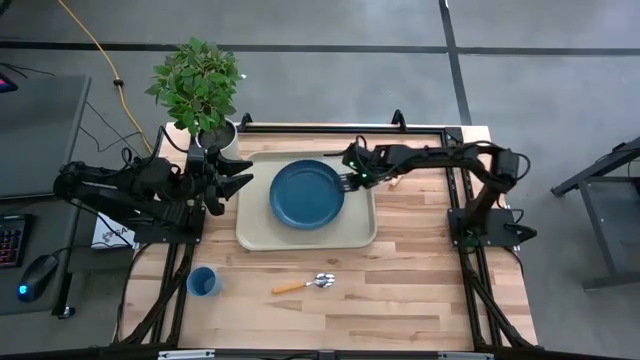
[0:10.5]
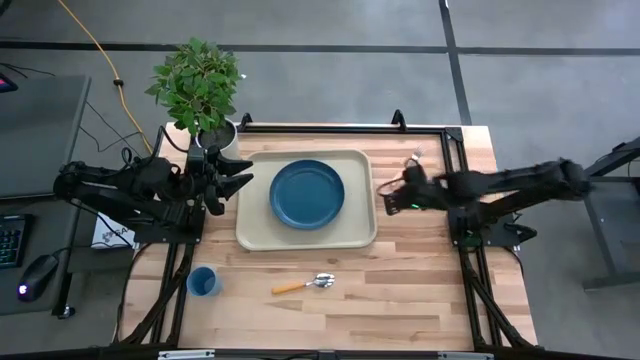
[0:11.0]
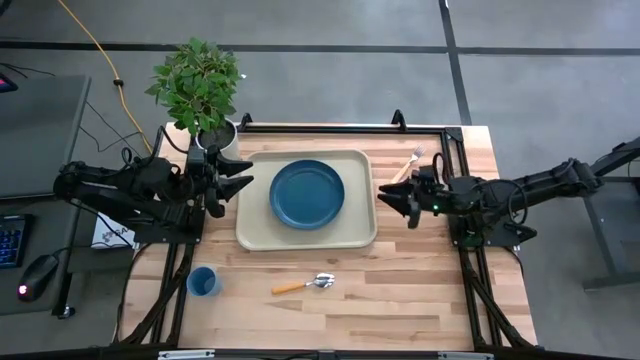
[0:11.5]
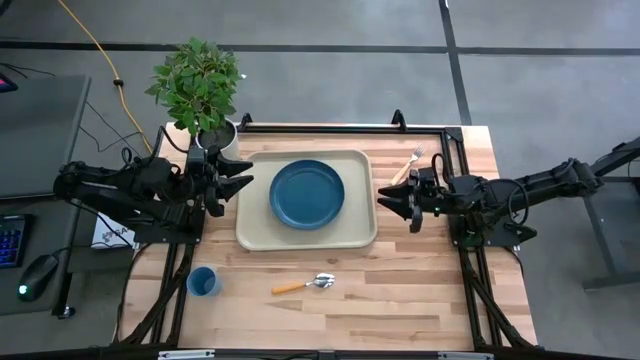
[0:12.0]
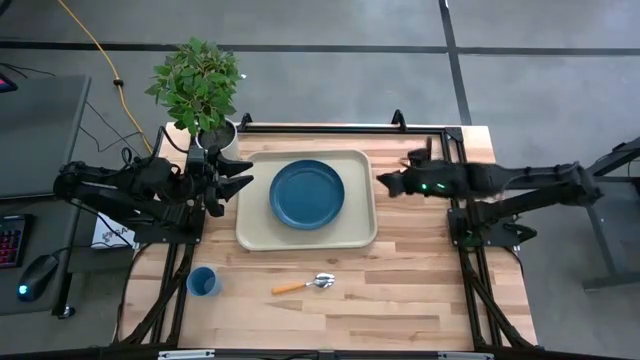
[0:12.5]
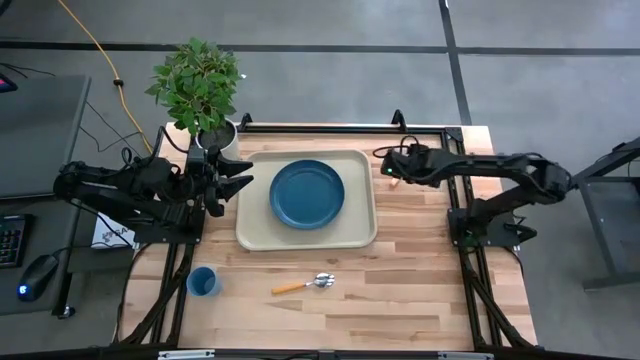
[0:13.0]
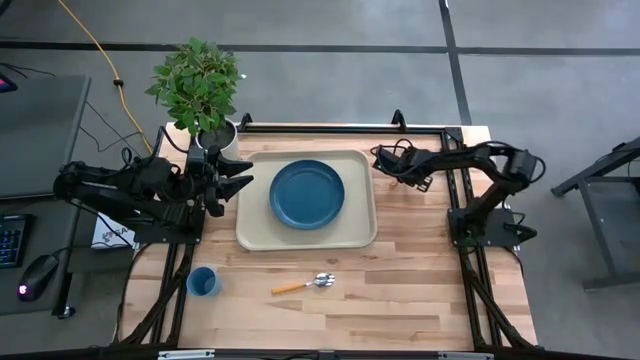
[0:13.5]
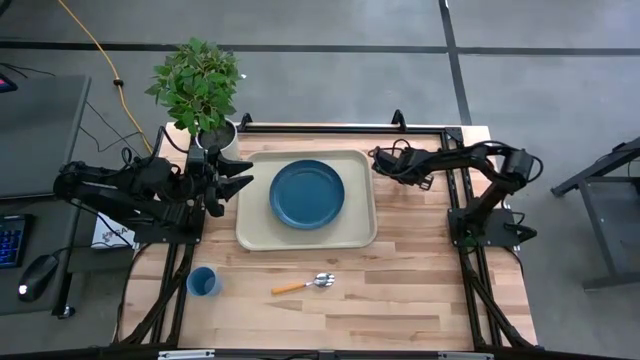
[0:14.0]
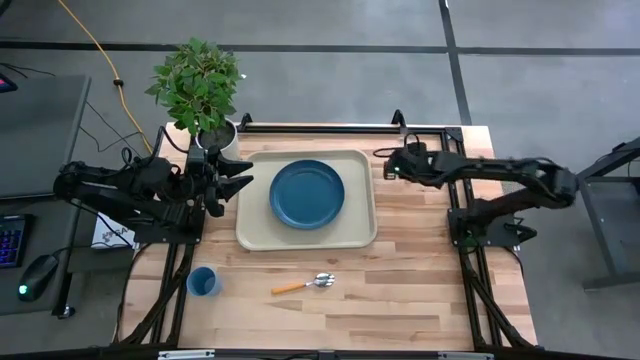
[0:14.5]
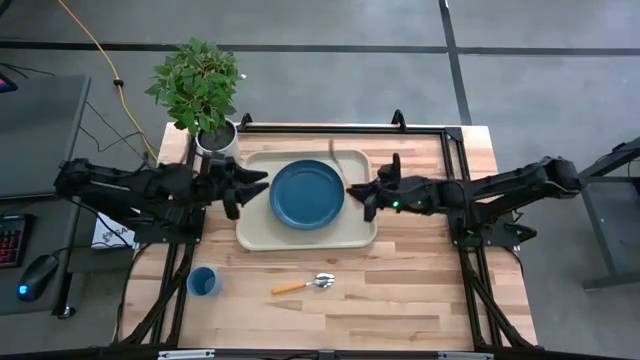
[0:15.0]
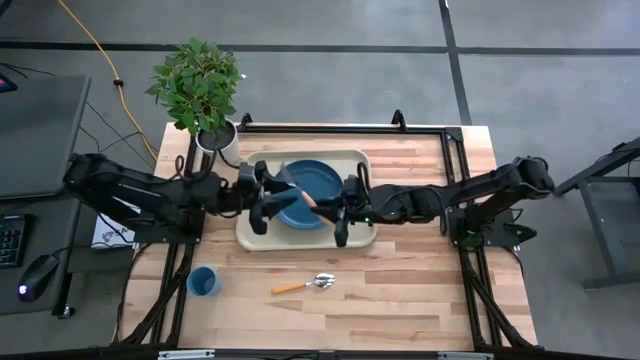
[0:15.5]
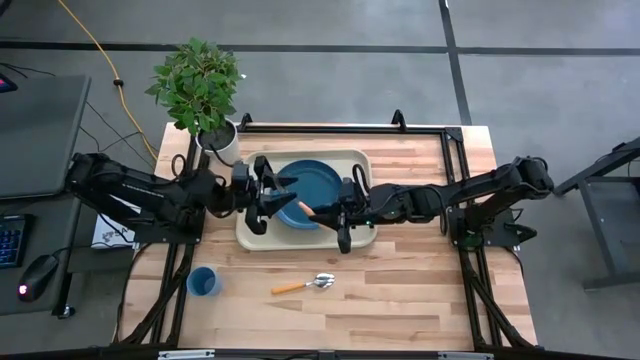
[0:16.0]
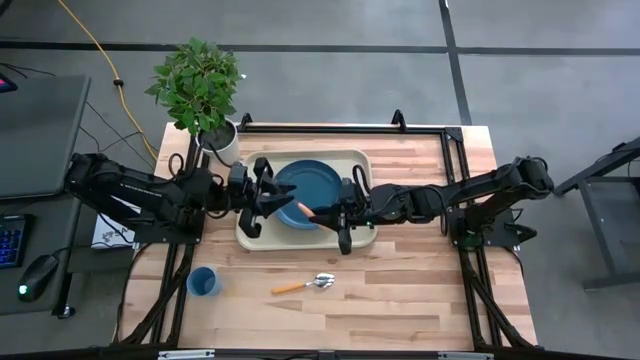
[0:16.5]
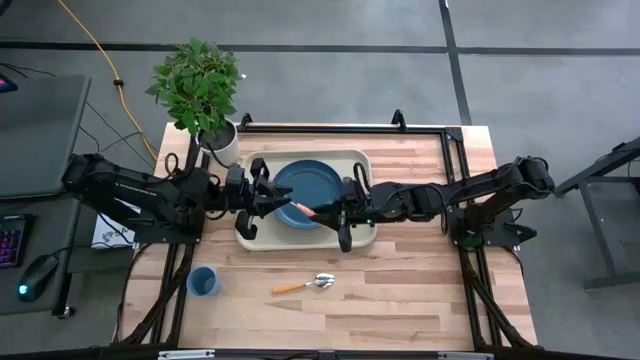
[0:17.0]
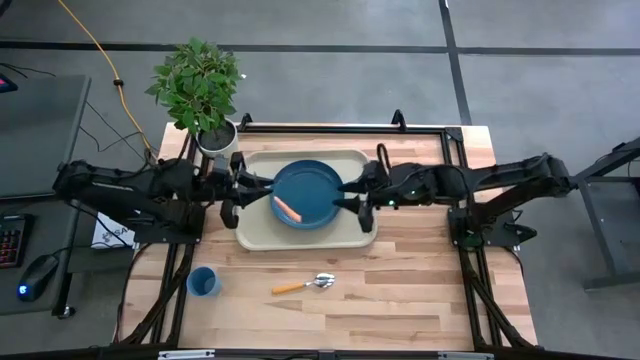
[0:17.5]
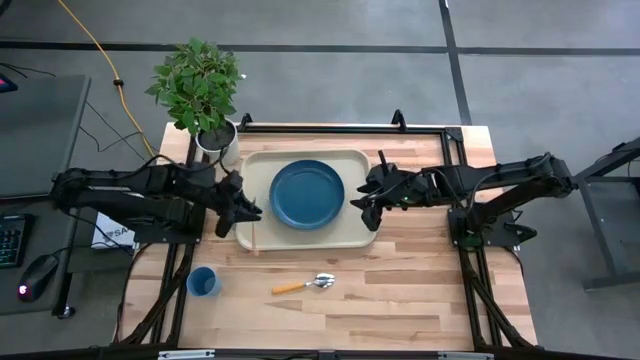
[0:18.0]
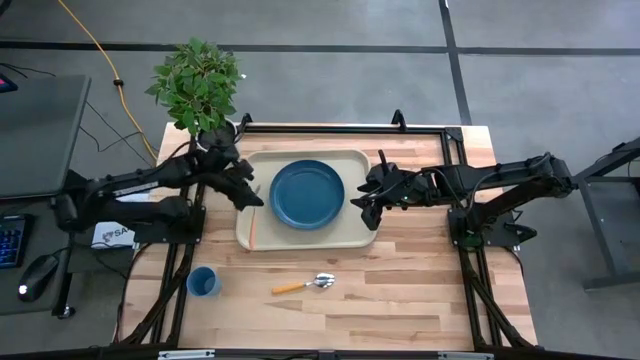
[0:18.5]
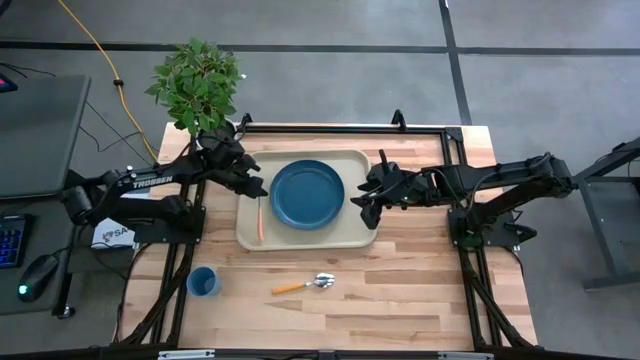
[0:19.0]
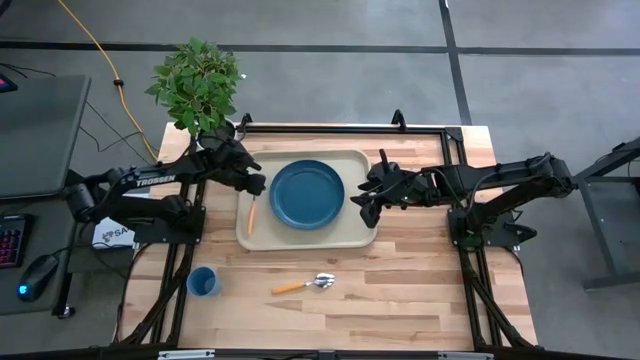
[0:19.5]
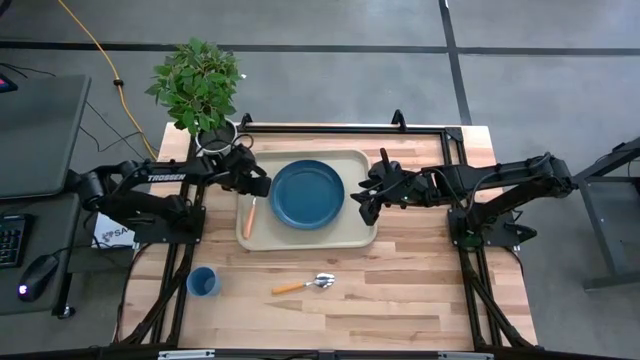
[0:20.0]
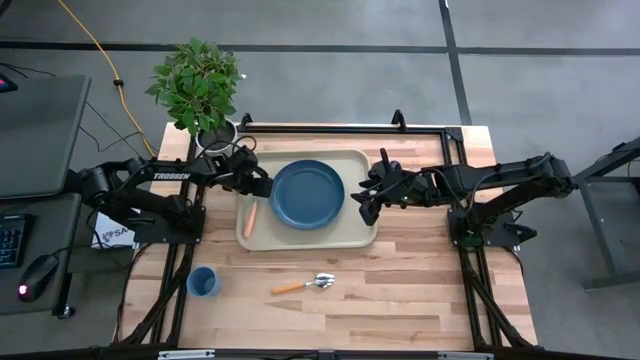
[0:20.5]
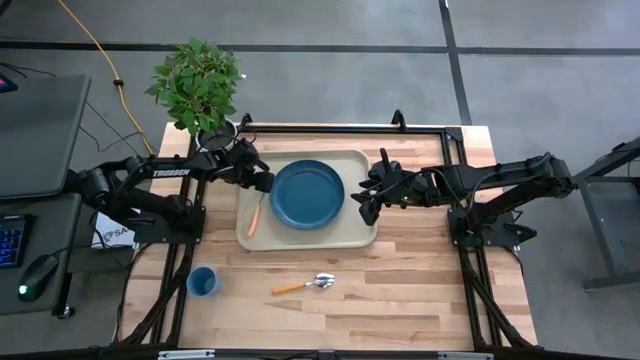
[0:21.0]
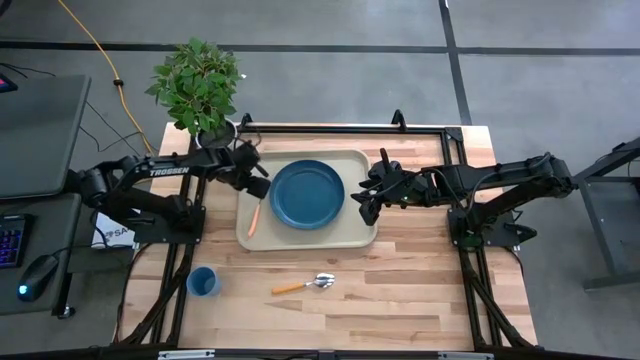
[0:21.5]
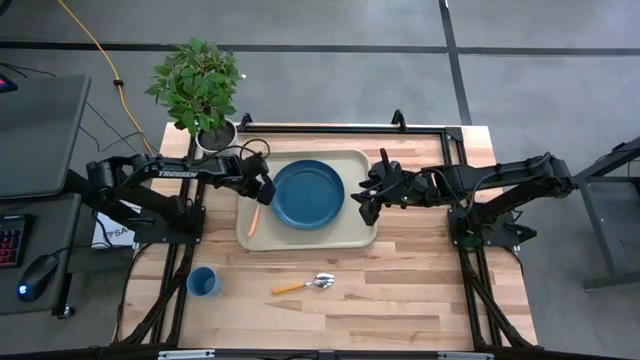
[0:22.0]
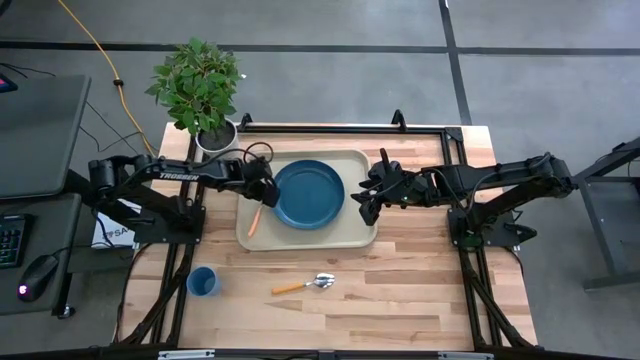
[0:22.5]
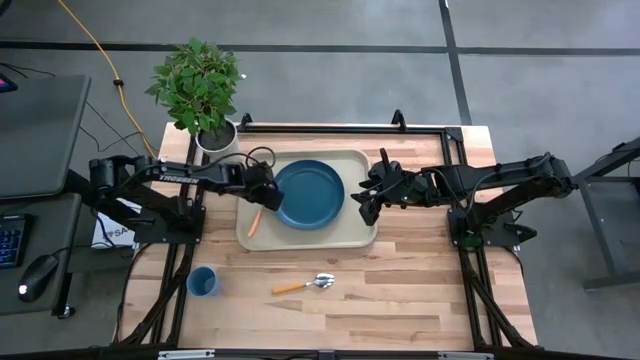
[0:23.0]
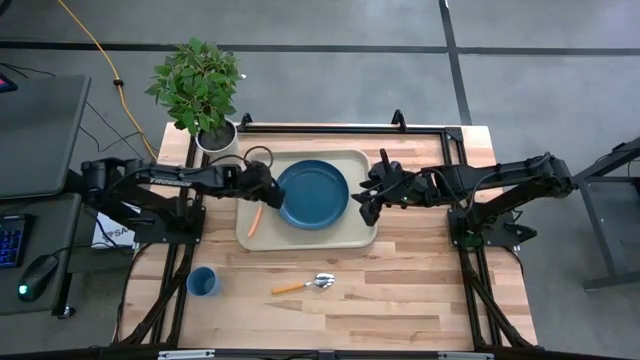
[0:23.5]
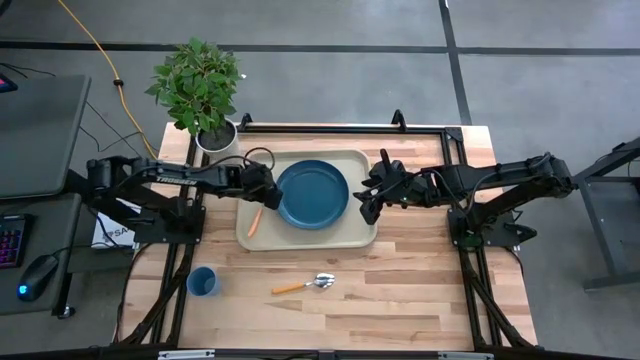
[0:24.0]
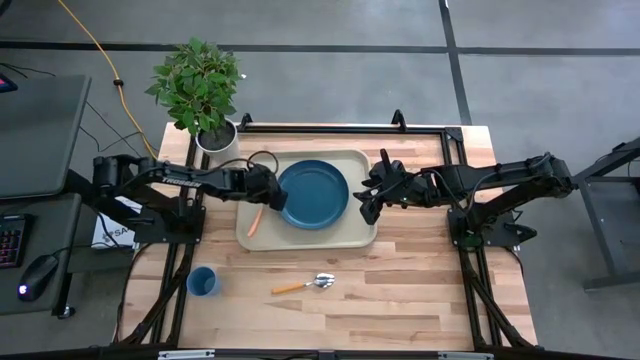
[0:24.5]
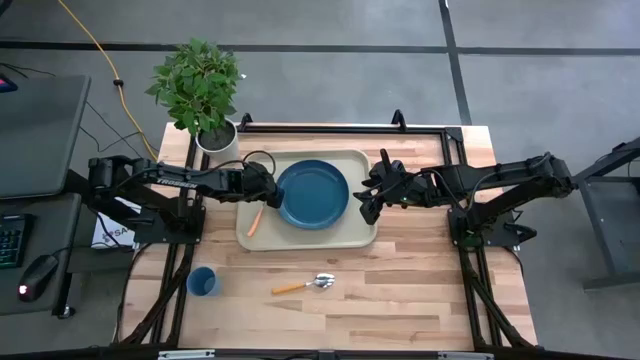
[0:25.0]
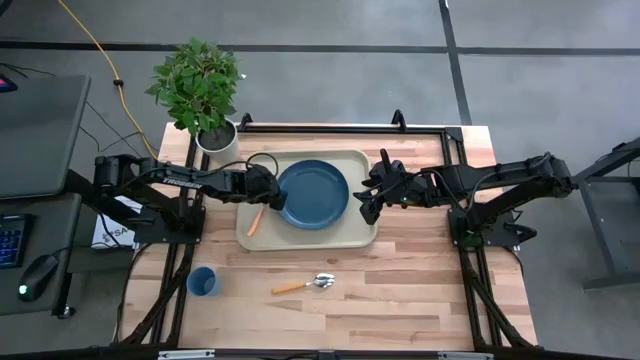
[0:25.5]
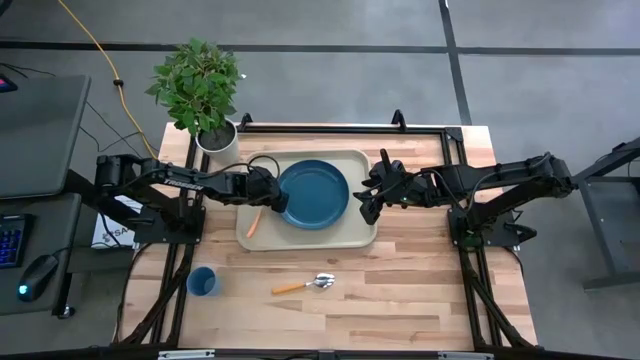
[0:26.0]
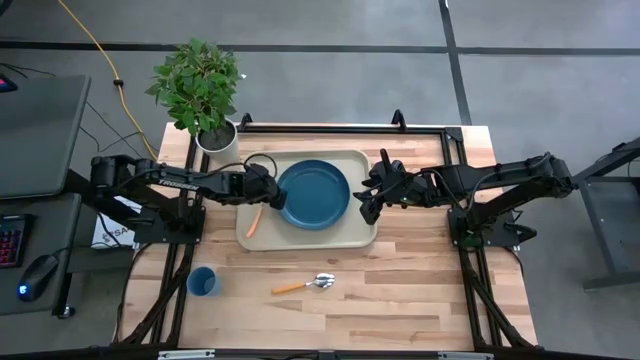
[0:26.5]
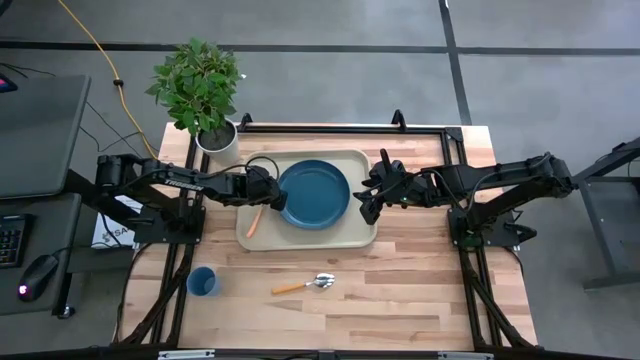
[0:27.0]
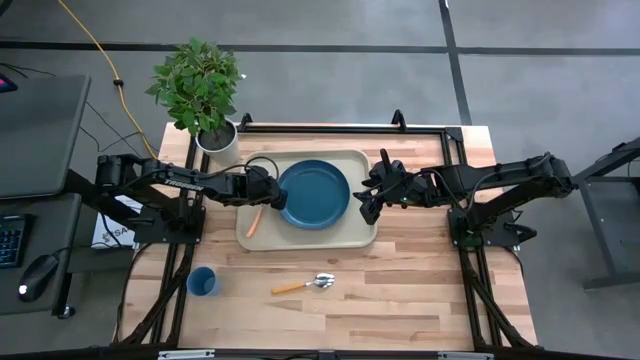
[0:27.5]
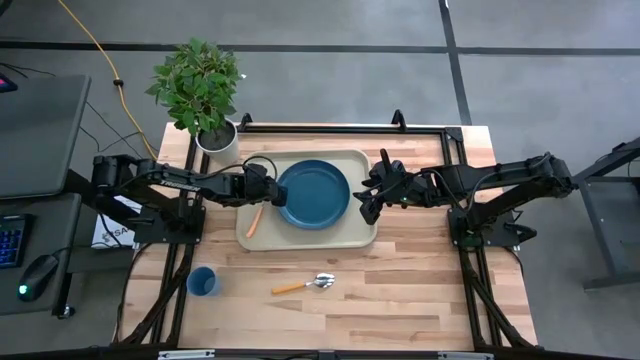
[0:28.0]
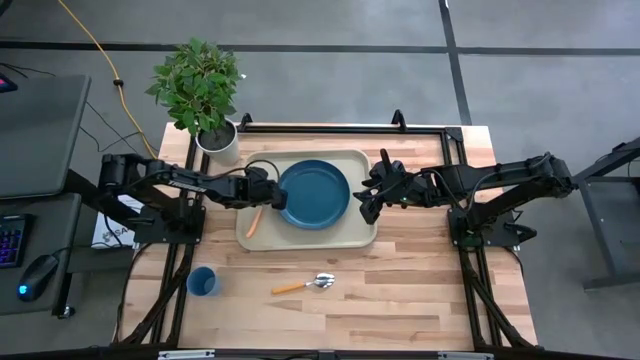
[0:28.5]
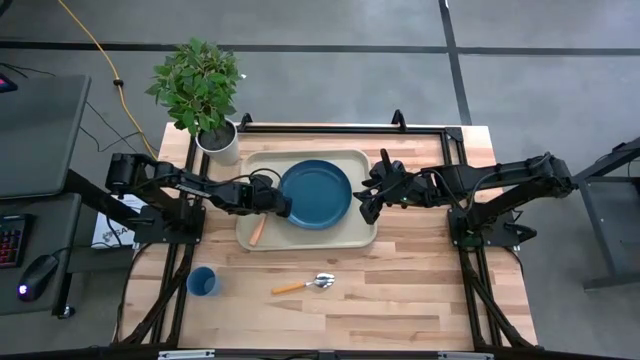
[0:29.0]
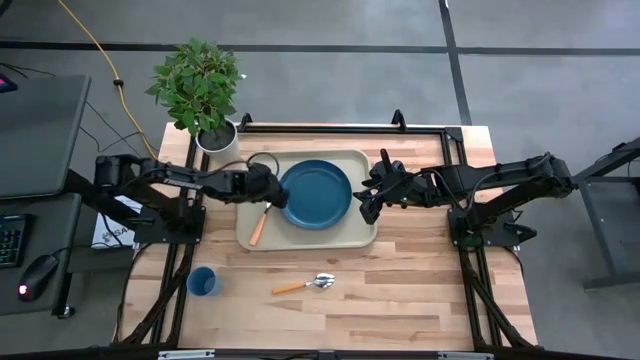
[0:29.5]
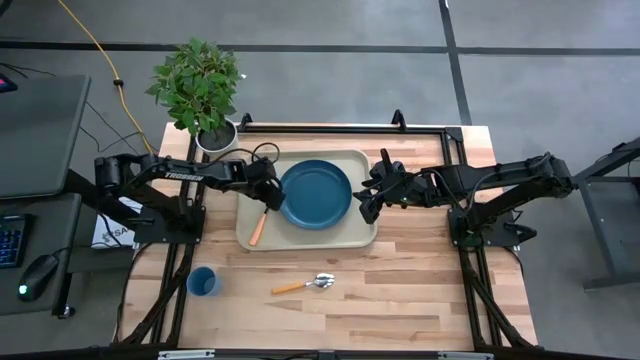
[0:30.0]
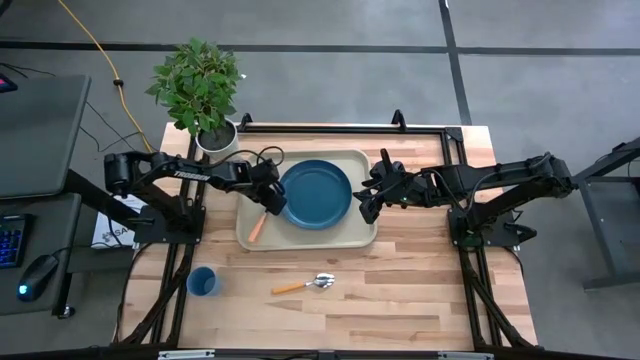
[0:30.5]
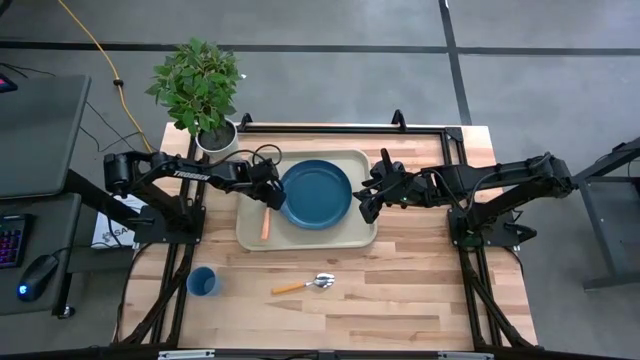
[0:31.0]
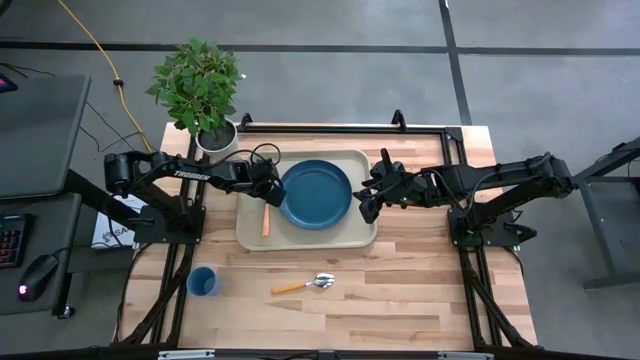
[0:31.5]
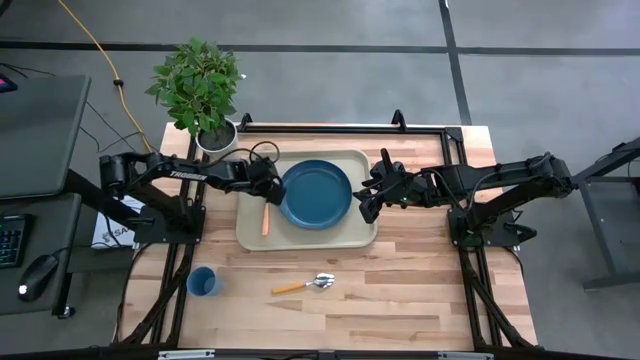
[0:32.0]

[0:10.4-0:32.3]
Task: Pick and place plate/cup/fork/spoon on tray
Put the fork beside the plate on the serving tray
